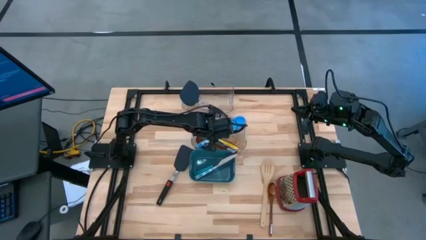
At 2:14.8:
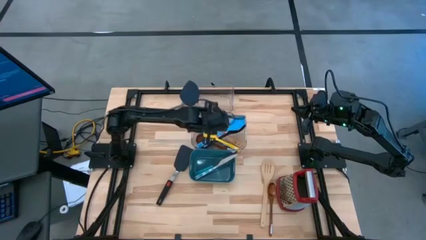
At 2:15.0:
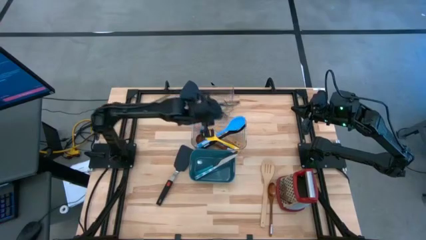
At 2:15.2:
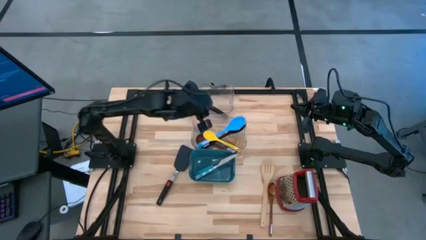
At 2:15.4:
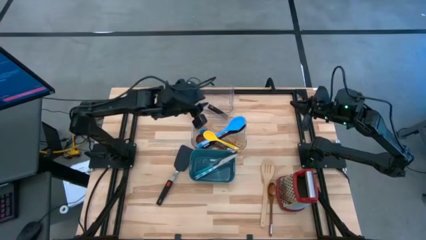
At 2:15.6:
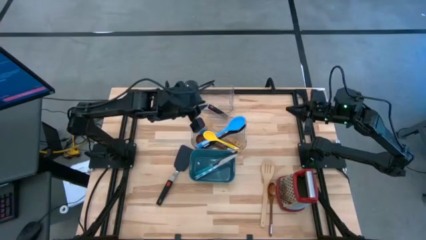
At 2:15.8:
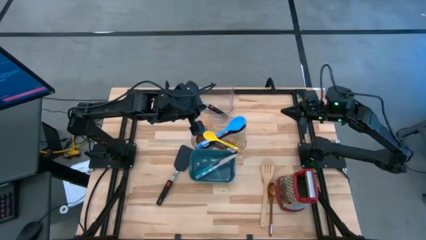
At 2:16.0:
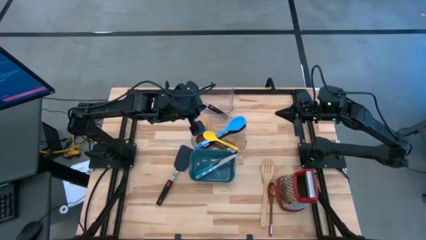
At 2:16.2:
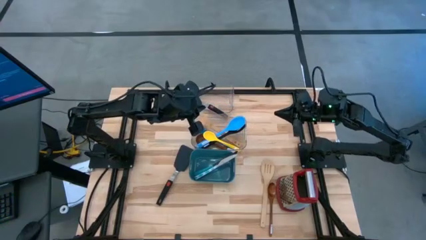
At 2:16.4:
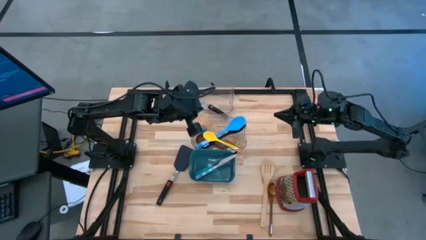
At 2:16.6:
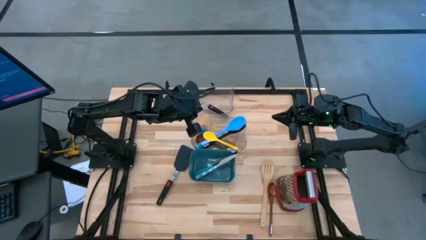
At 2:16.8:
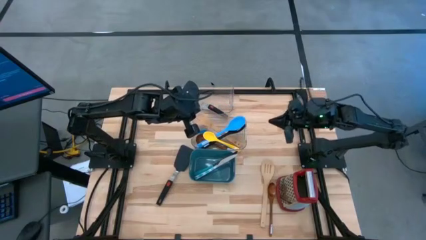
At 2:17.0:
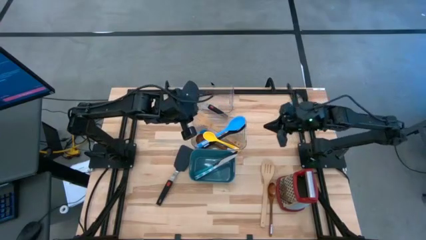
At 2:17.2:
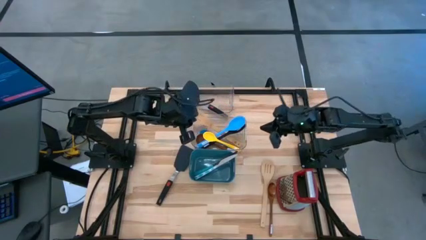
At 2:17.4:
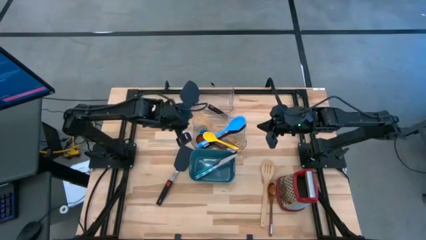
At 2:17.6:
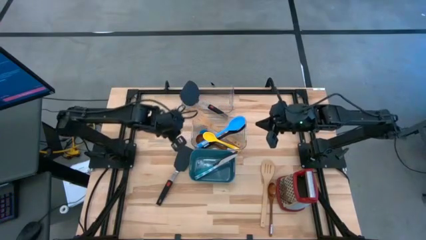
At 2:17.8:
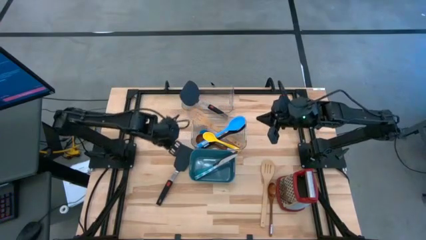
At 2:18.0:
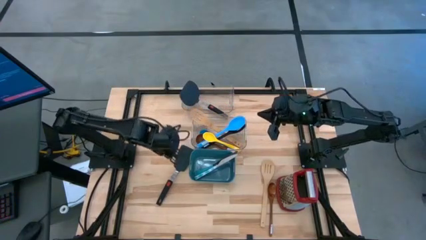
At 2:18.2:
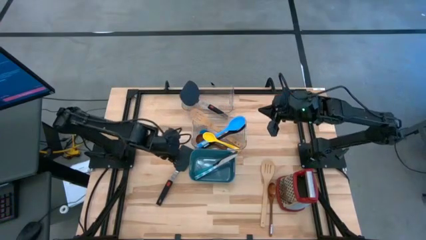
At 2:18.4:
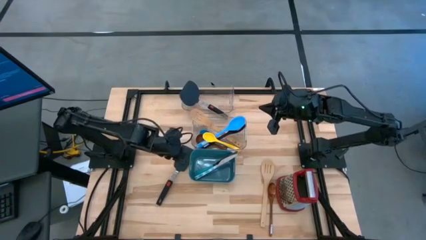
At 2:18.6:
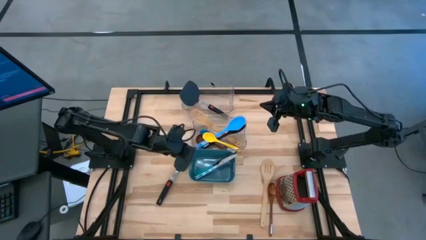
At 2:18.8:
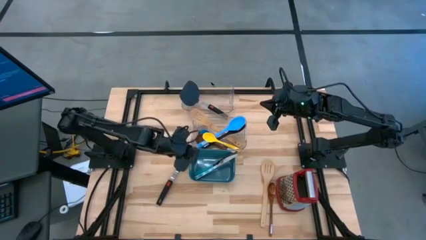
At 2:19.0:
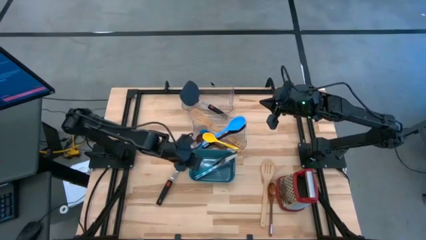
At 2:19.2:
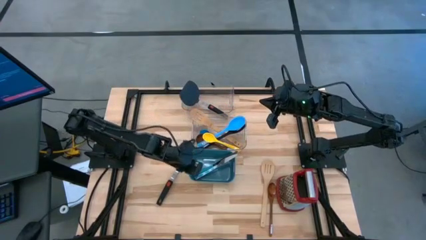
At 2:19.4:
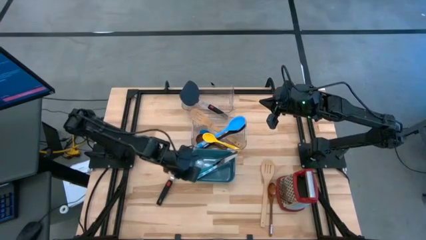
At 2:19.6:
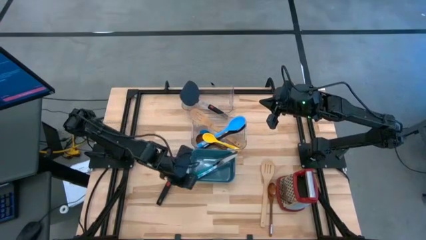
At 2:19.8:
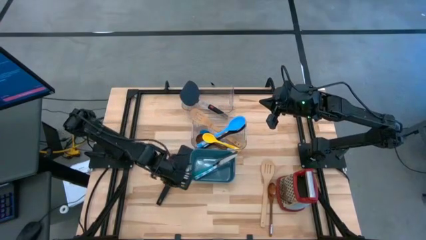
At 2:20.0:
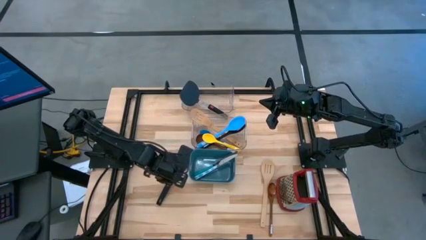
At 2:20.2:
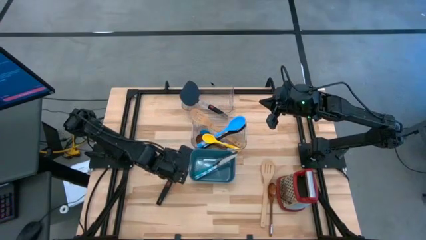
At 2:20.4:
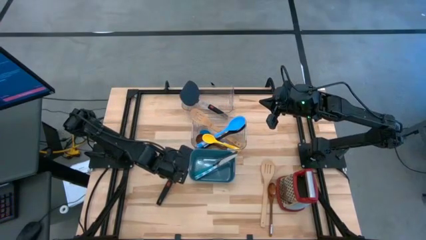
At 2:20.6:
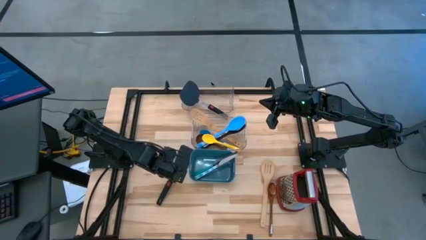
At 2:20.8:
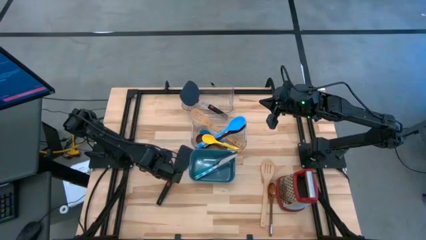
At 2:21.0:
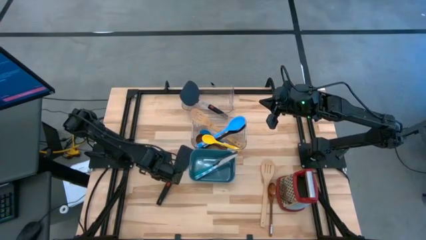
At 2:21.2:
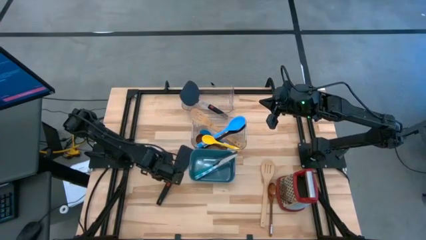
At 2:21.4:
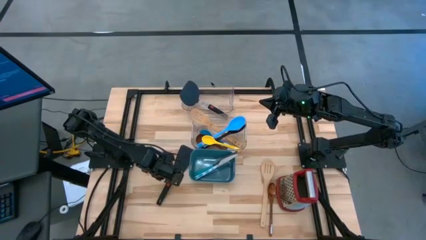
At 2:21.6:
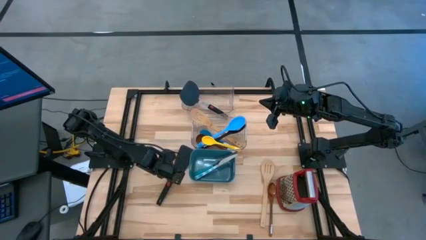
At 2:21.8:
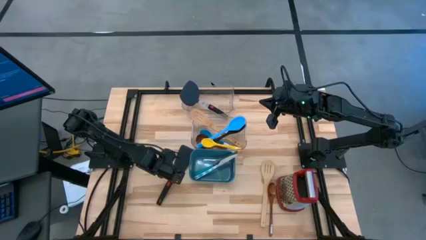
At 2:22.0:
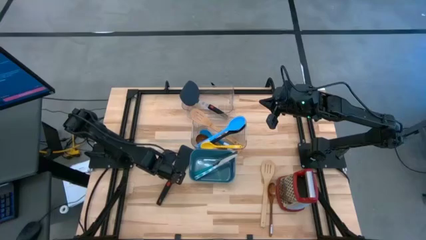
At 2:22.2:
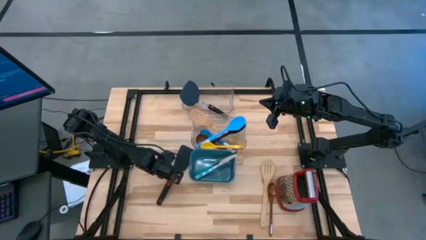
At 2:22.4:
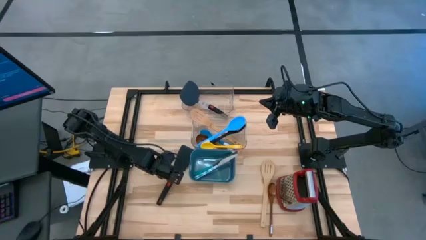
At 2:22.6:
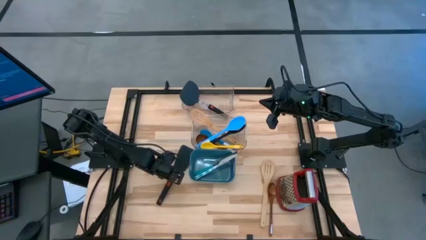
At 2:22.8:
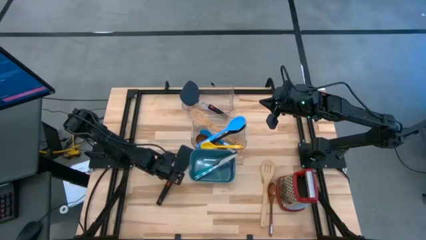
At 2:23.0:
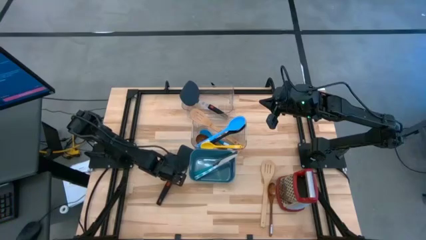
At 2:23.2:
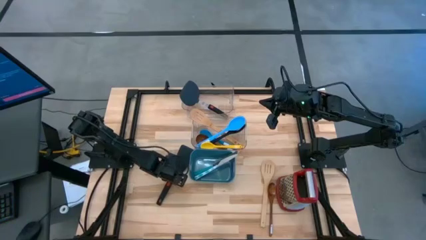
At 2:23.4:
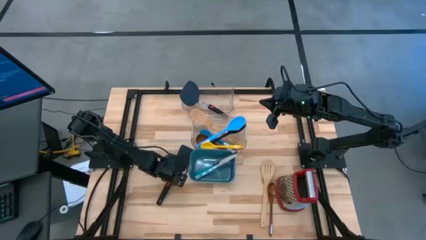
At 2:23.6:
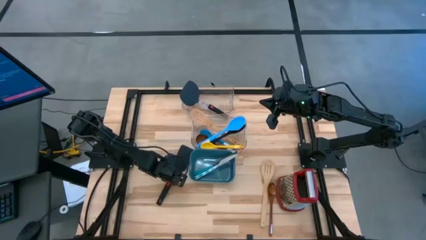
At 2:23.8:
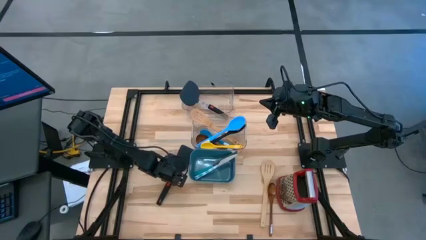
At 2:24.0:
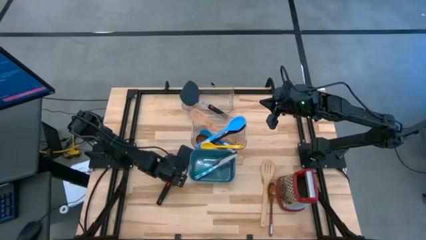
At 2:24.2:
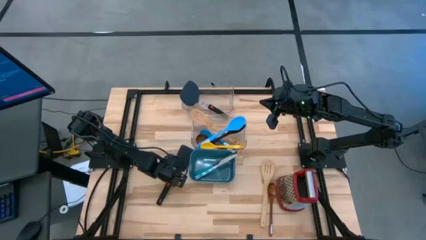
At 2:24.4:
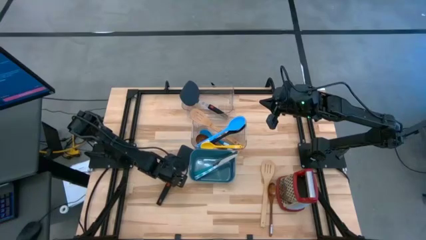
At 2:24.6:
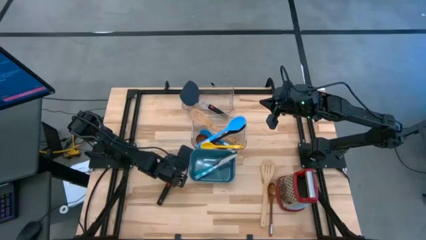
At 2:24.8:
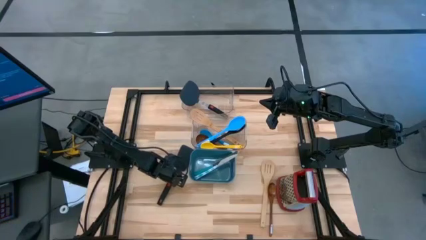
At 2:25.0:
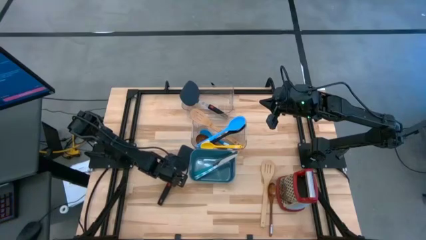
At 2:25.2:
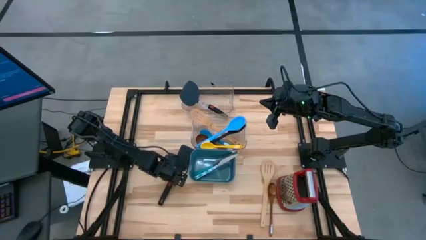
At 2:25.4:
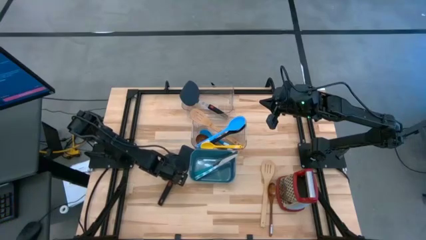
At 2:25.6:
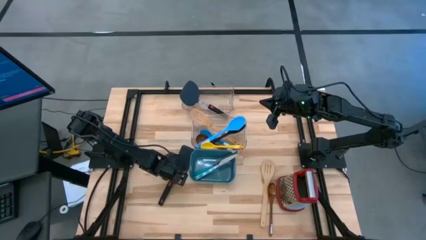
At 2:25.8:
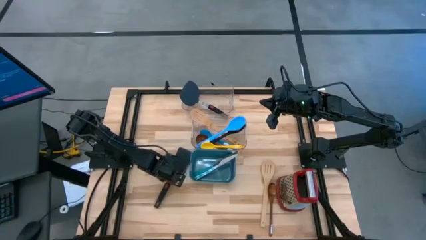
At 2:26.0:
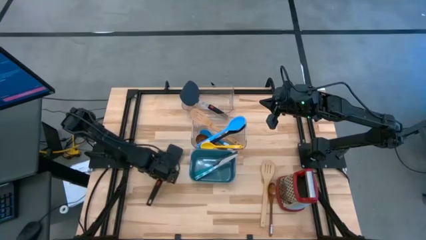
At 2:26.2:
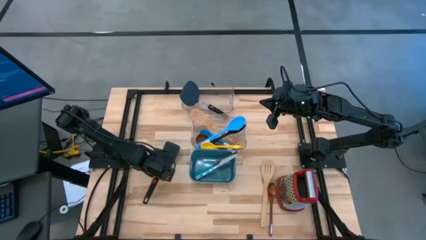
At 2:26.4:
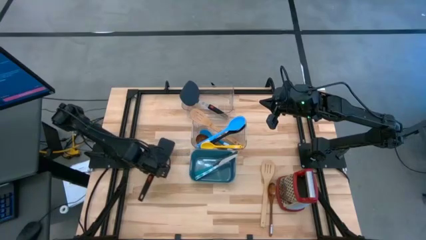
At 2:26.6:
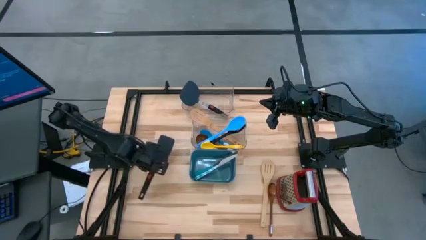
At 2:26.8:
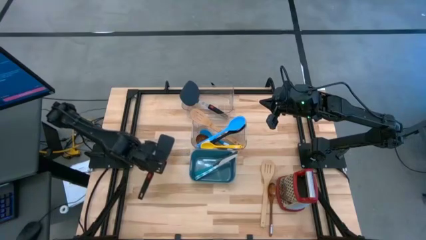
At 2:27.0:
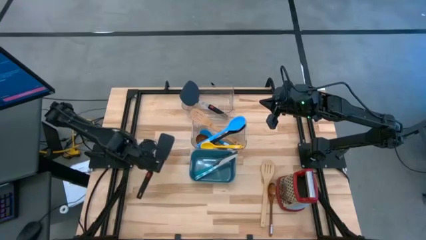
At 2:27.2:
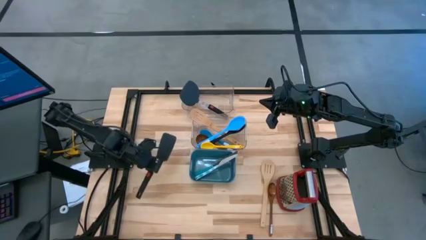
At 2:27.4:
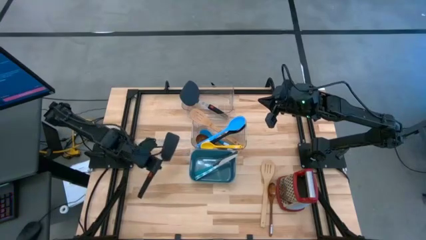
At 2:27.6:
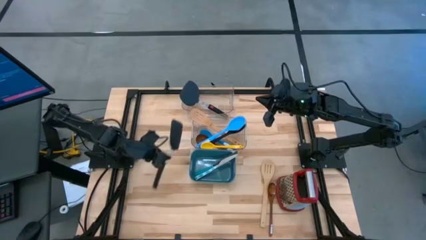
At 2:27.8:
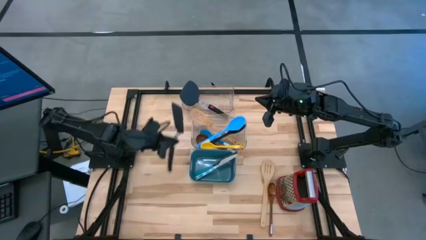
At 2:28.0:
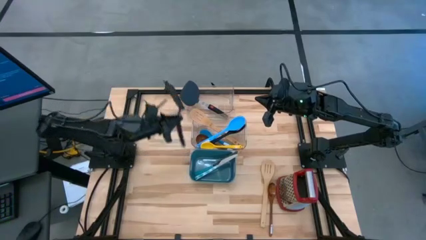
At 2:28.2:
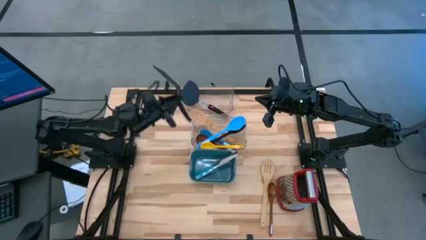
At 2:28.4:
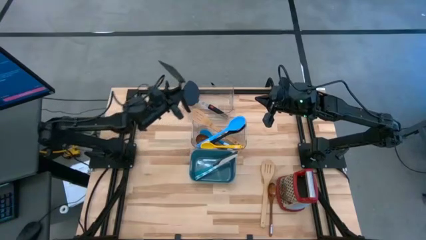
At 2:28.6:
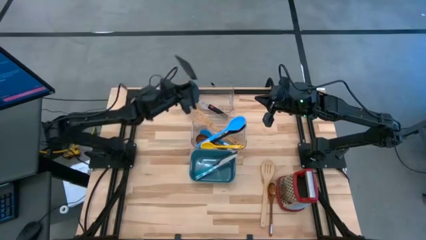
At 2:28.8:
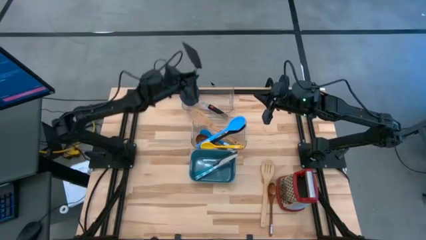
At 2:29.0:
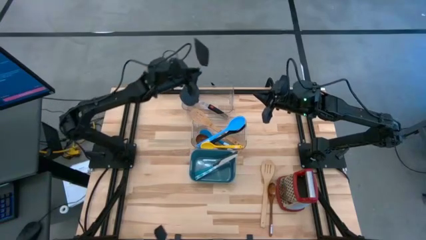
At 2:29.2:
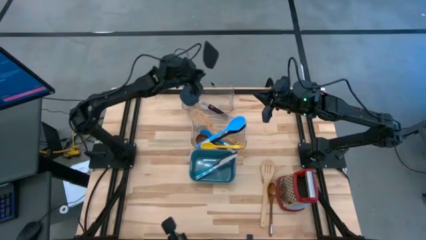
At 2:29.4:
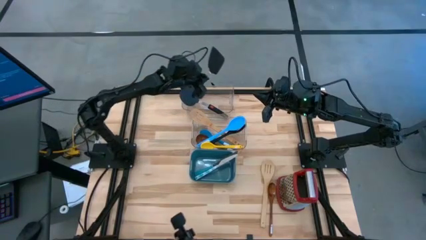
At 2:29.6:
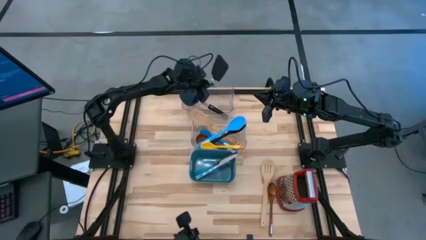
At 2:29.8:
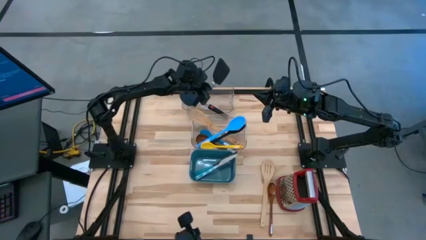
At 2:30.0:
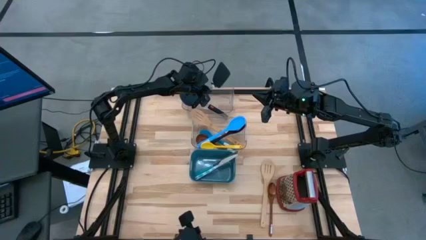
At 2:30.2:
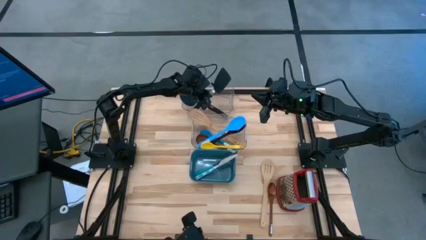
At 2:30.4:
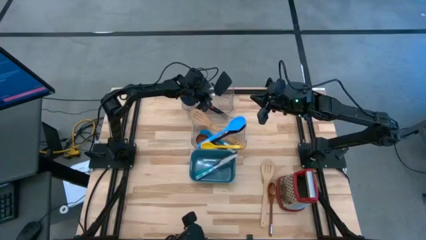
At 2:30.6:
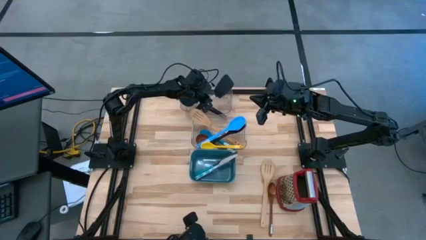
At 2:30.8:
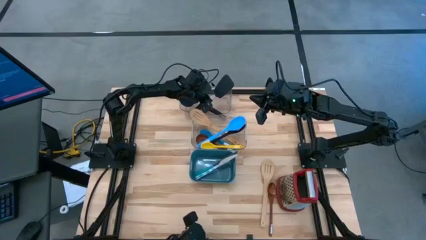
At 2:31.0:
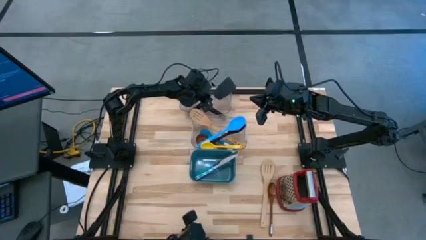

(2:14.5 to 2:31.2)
Task: Pick & Place Kitchen Items
Put the turner spatula into the top transparent bin
